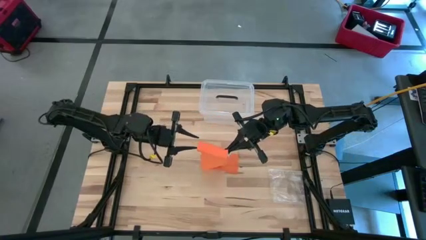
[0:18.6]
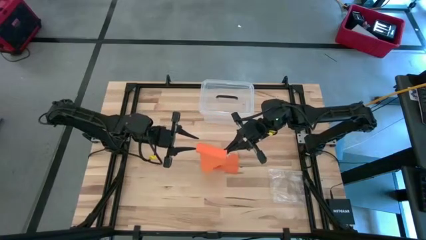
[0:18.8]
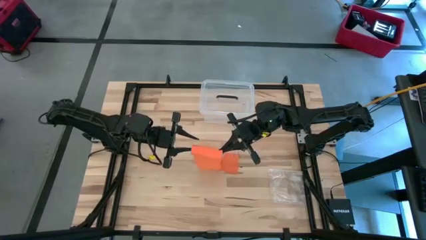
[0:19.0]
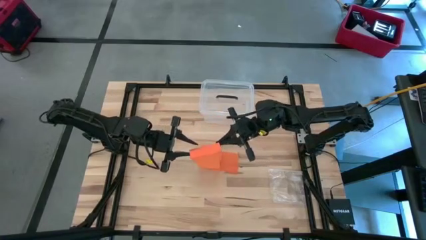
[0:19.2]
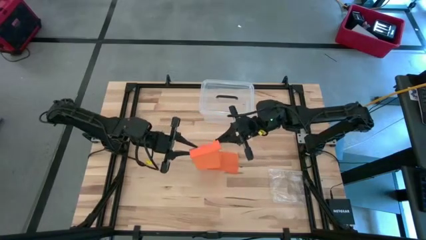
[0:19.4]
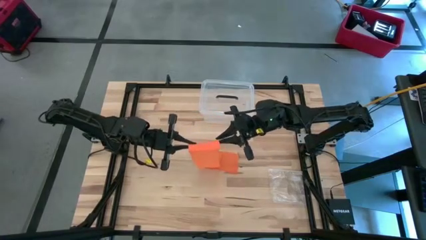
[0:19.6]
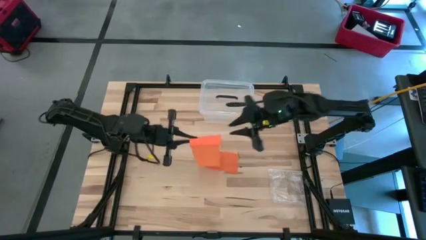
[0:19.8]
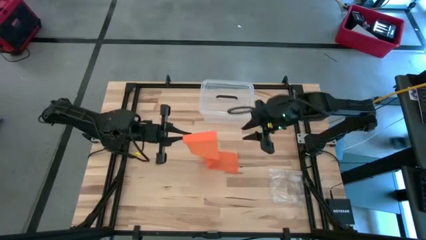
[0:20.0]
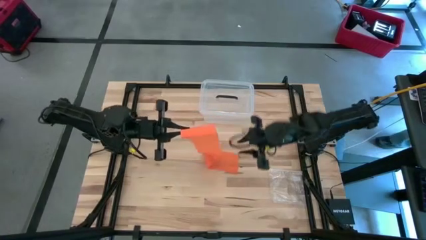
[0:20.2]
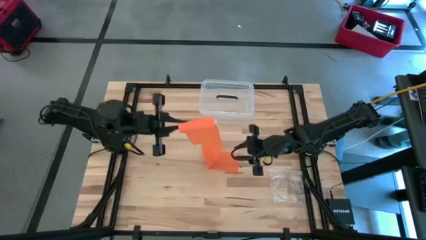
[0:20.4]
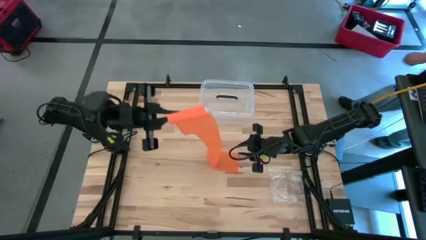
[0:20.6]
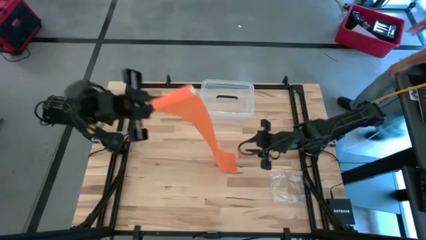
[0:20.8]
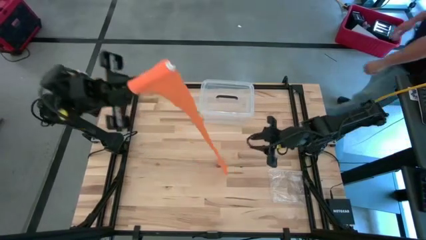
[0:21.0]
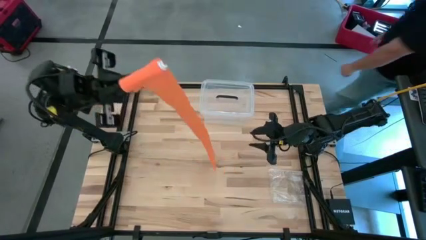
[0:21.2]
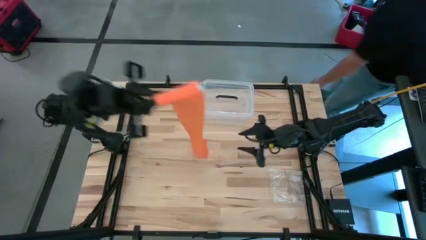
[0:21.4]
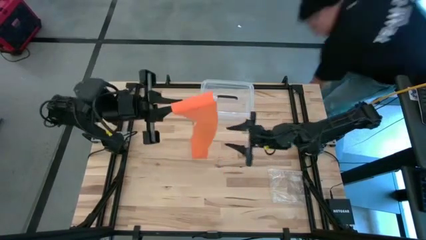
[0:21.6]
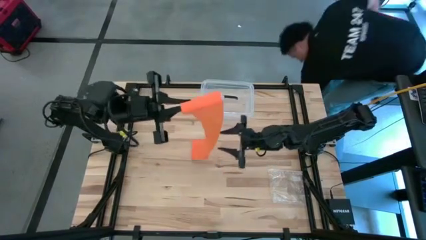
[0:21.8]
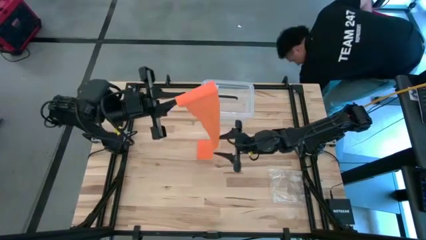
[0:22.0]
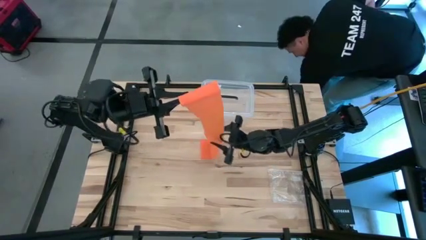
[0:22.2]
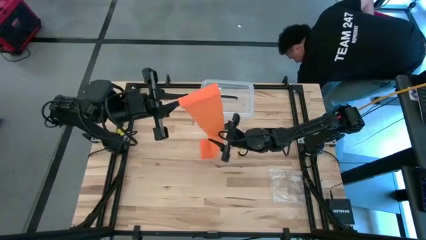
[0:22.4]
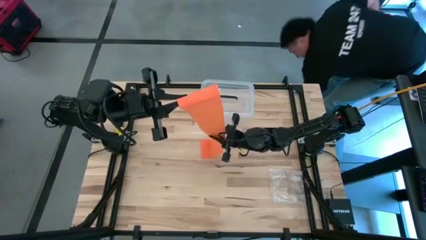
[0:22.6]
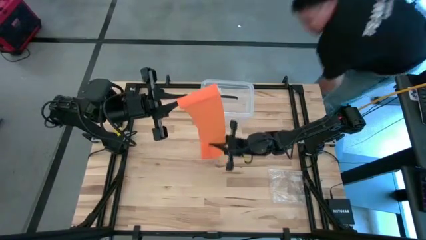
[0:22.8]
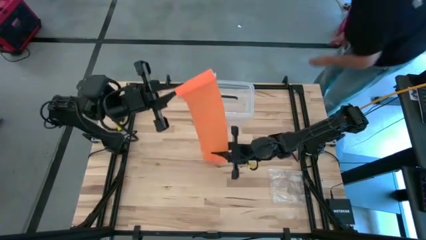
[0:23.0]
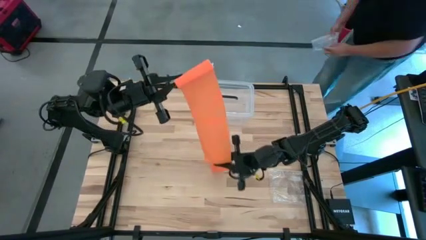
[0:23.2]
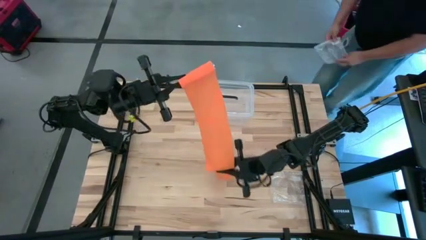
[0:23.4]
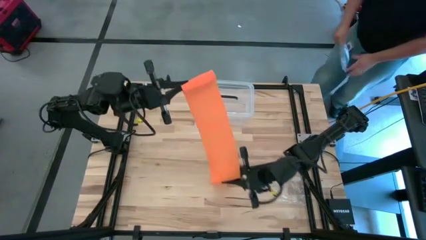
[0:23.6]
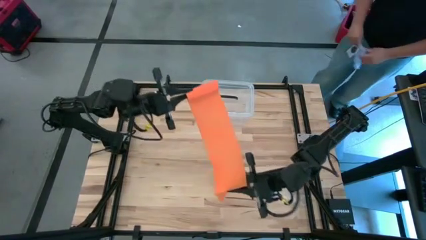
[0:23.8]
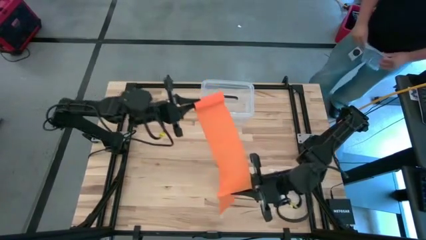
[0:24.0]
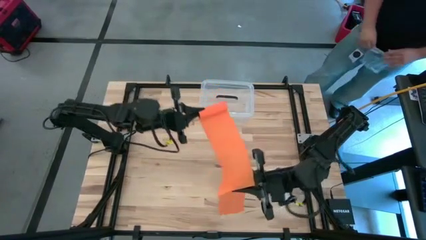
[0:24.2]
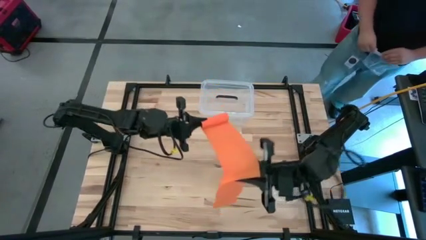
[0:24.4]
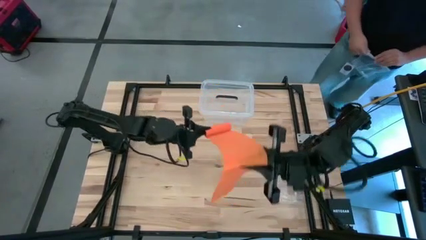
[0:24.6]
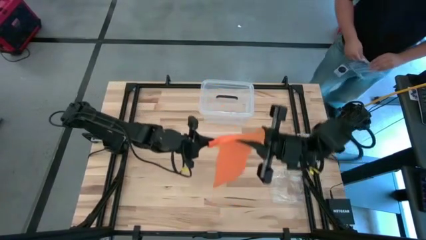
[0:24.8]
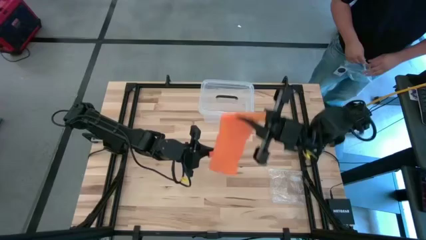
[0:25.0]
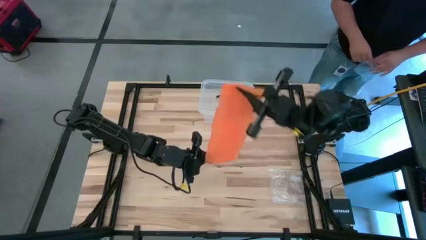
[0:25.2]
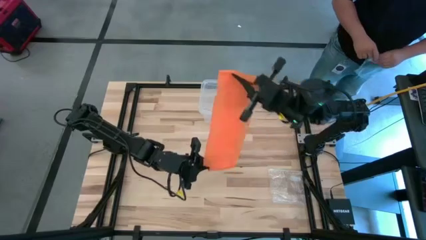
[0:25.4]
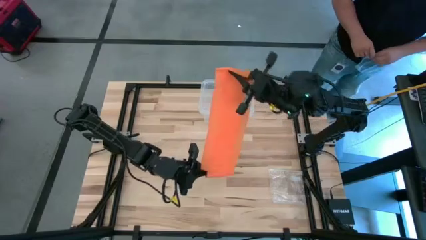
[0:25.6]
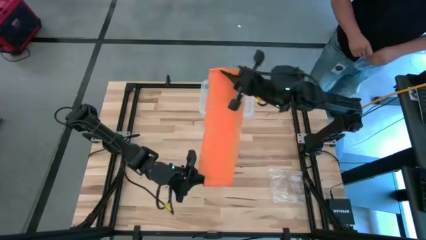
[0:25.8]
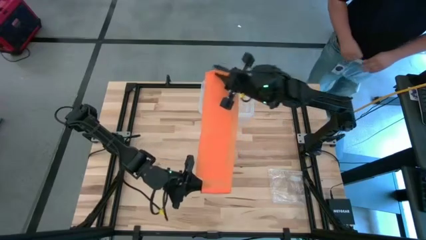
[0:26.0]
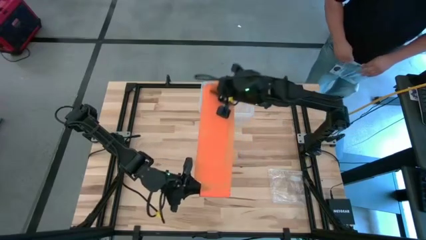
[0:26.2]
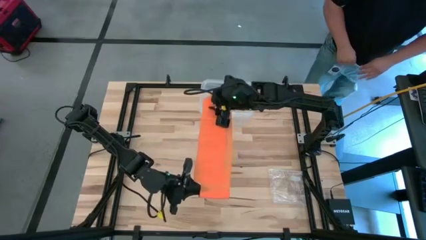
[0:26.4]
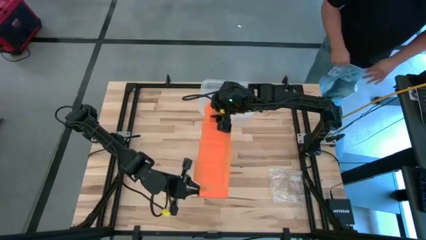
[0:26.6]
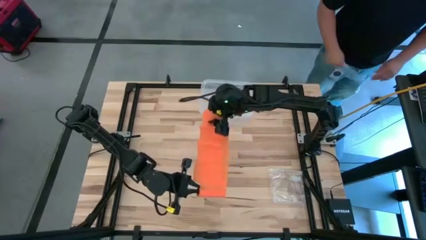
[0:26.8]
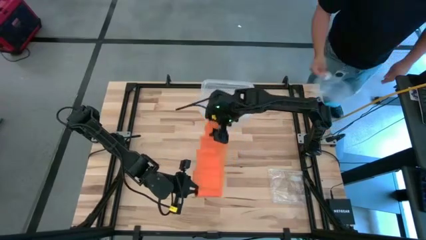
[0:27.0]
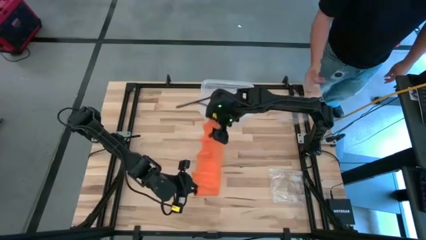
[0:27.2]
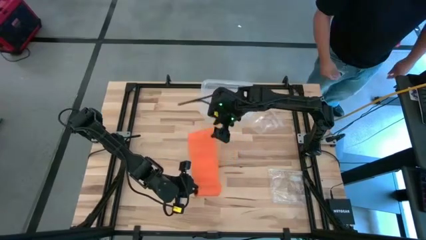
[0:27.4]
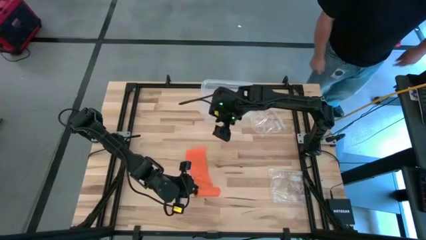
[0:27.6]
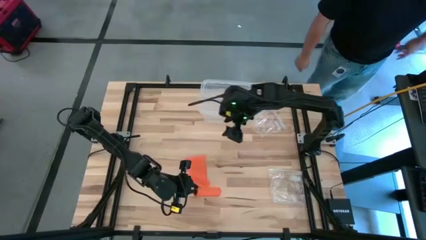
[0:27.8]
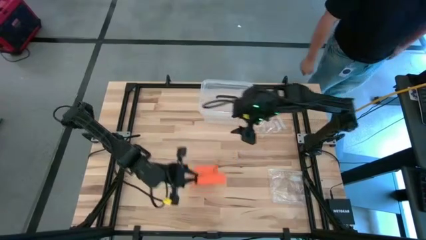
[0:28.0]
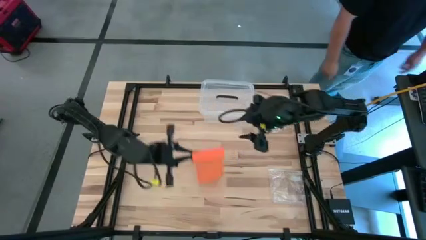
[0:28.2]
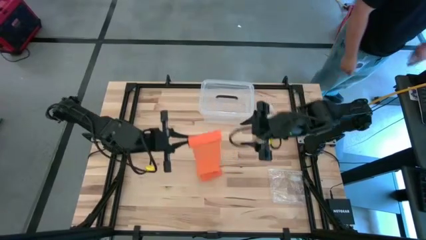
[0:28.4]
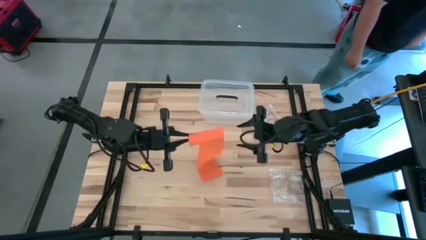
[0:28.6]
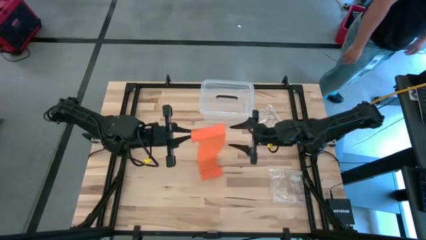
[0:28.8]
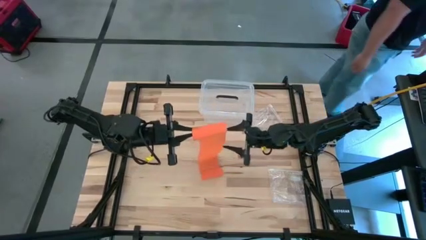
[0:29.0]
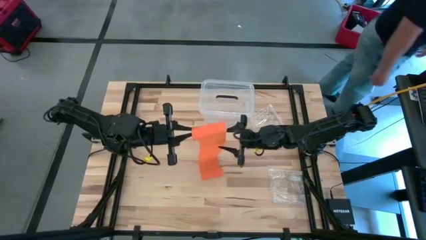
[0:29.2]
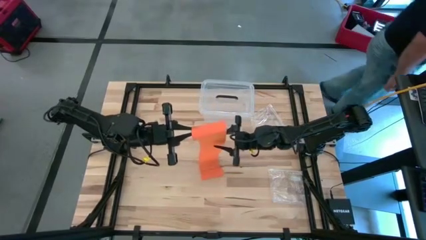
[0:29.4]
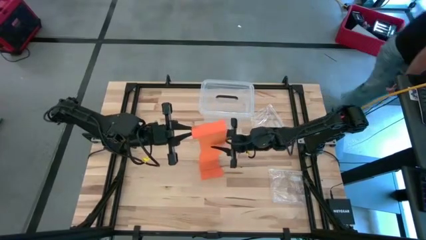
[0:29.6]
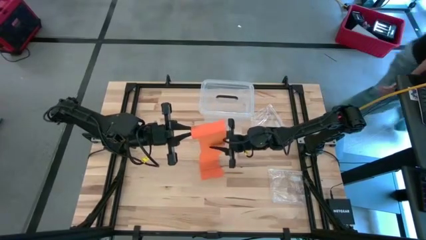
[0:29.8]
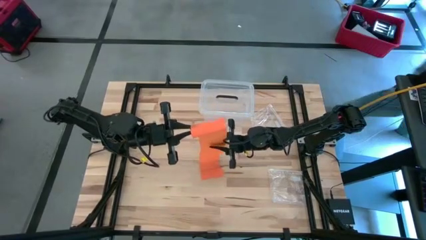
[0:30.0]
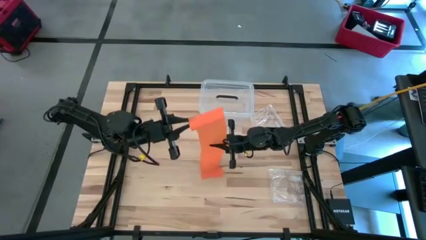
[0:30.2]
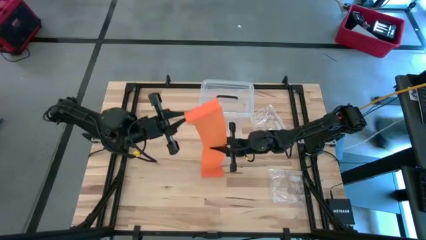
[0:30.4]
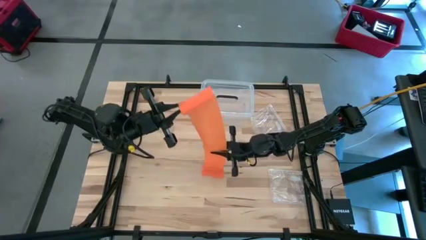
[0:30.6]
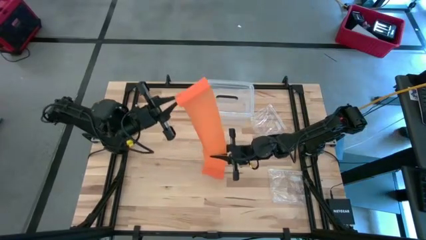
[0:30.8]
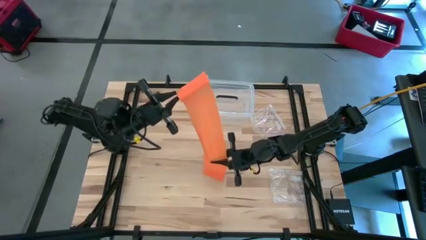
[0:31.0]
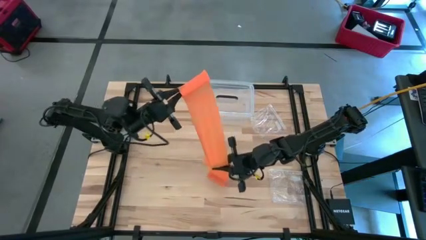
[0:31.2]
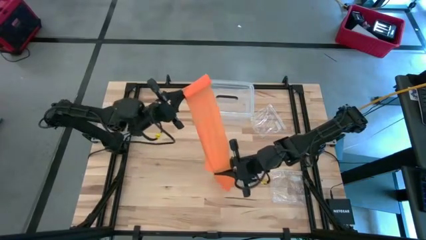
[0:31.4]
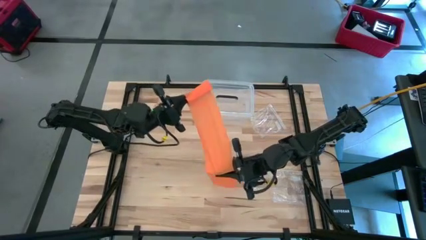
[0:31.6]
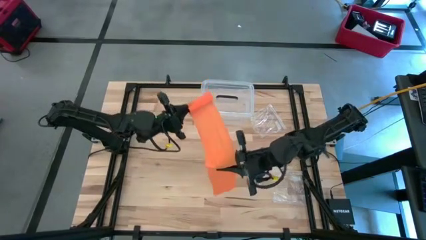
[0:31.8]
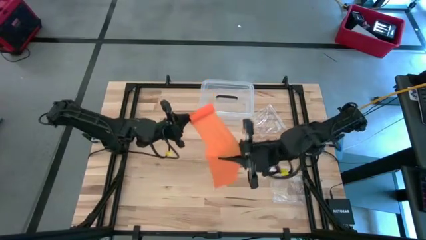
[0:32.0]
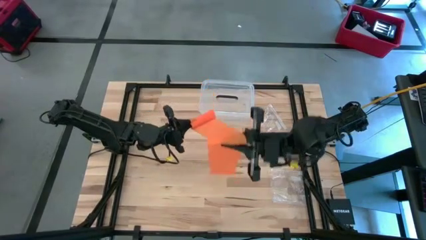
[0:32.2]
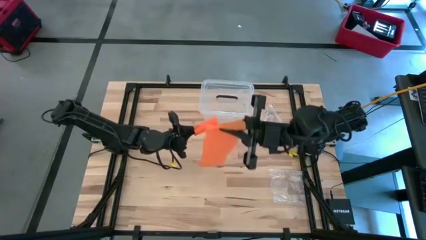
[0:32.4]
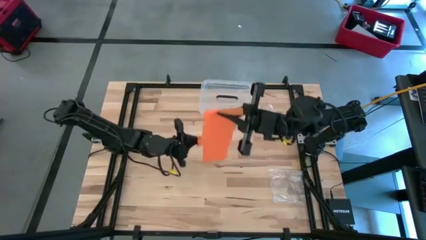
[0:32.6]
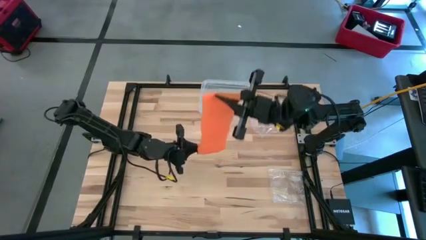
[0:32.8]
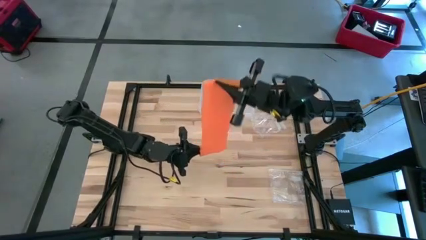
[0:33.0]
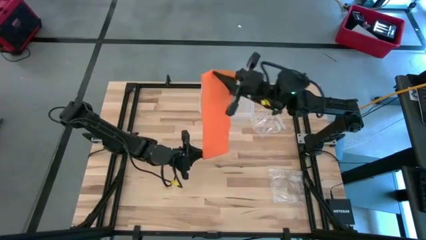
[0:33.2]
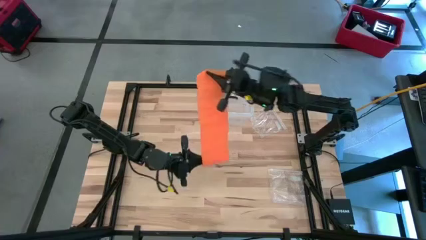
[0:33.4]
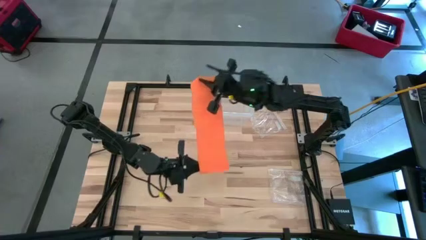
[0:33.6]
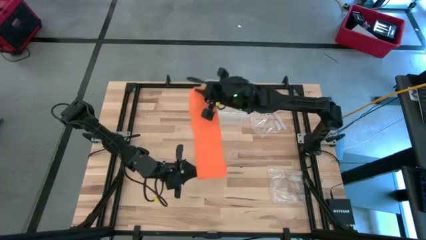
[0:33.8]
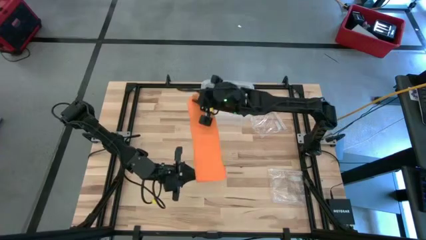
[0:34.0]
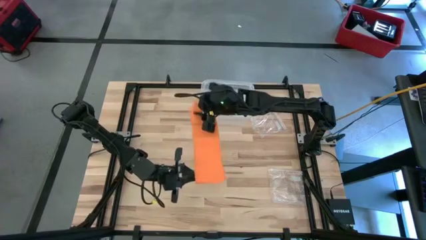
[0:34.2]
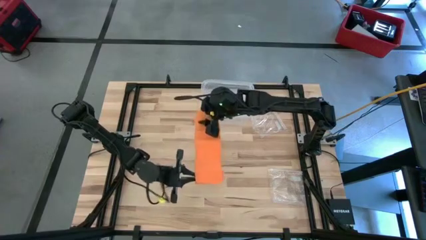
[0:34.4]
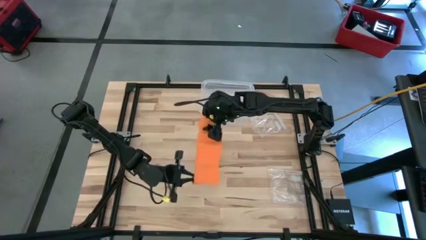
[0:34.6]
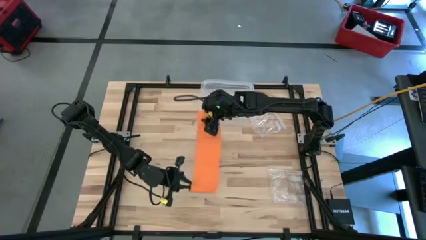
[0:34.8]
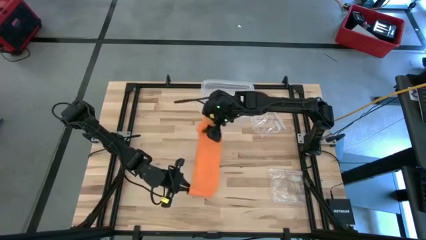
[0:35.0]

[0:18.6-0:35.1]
Task: Roll bandage
Roll the orange bandage
